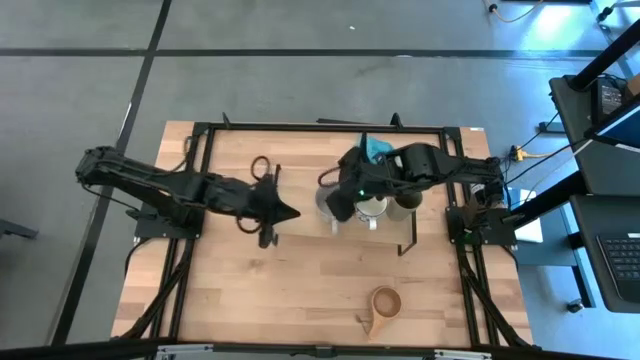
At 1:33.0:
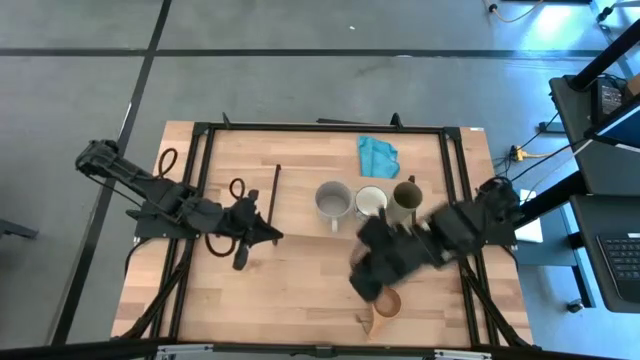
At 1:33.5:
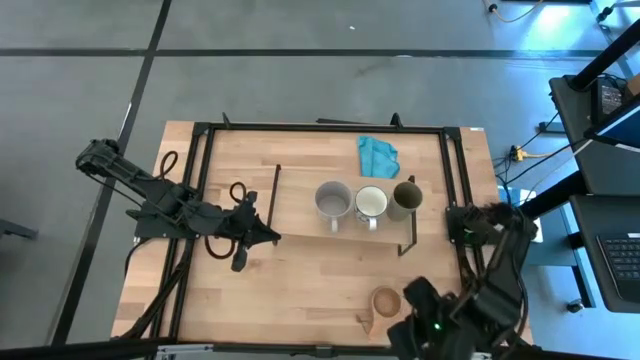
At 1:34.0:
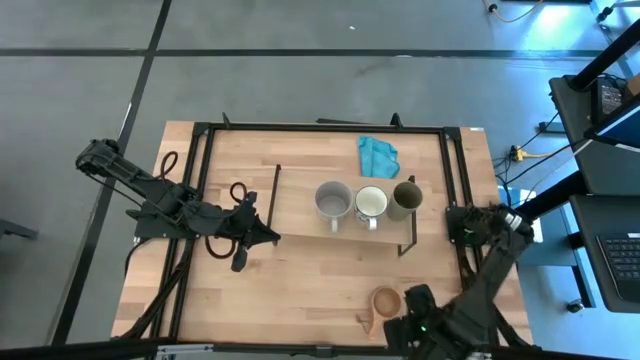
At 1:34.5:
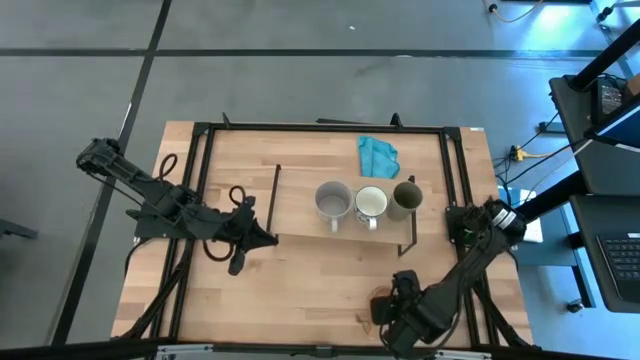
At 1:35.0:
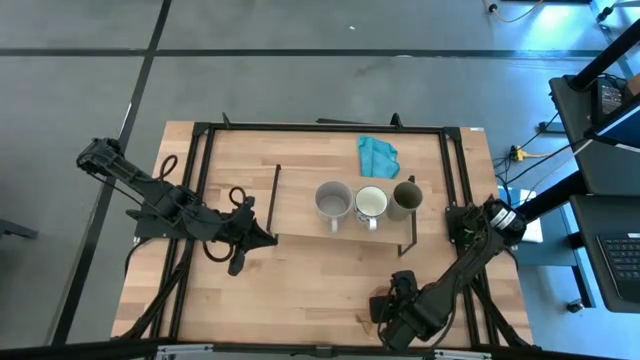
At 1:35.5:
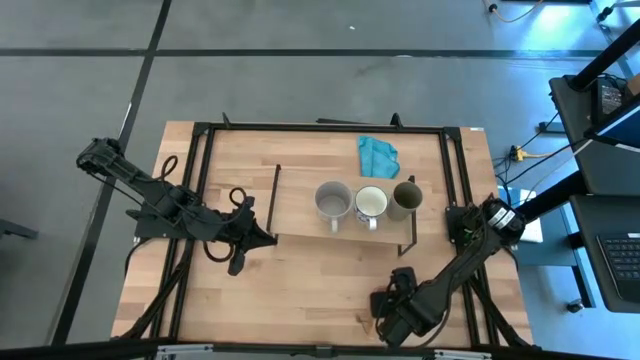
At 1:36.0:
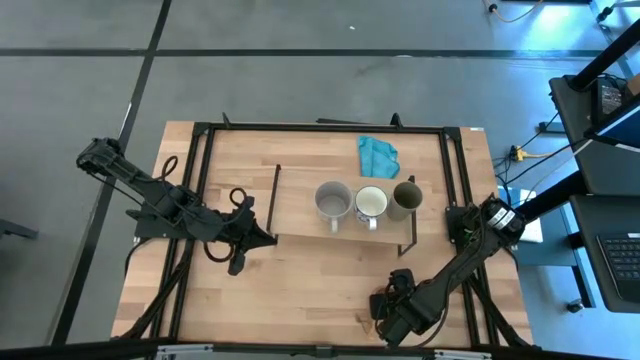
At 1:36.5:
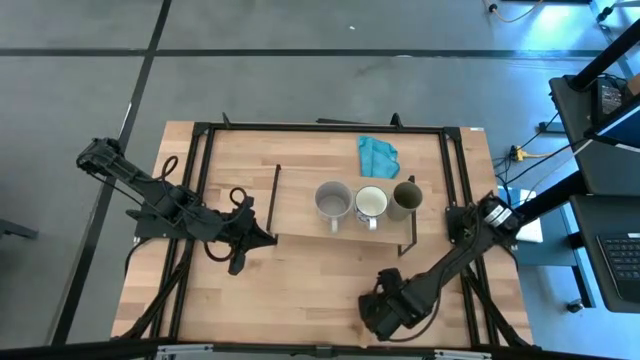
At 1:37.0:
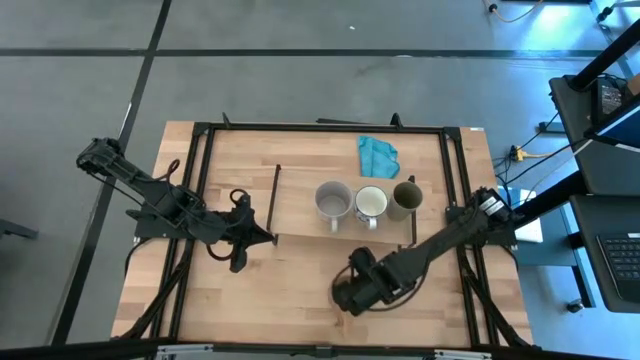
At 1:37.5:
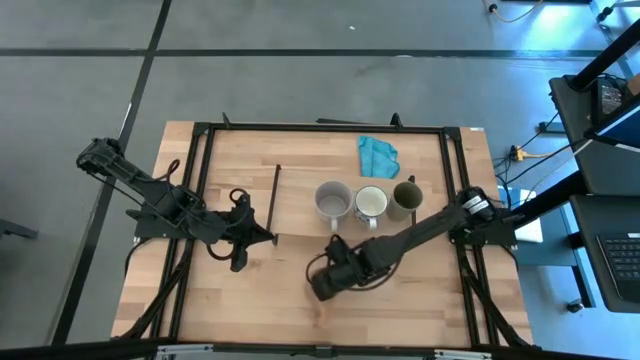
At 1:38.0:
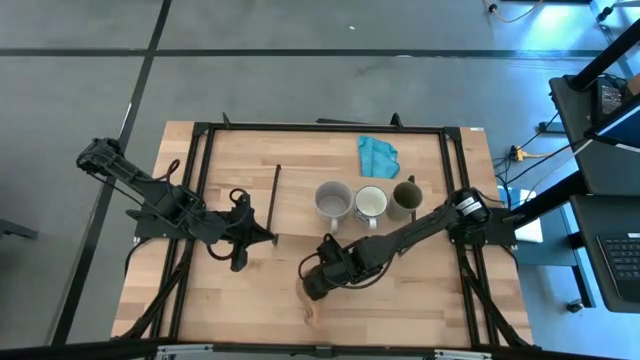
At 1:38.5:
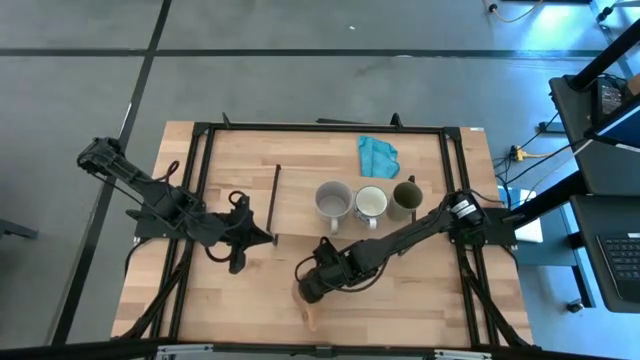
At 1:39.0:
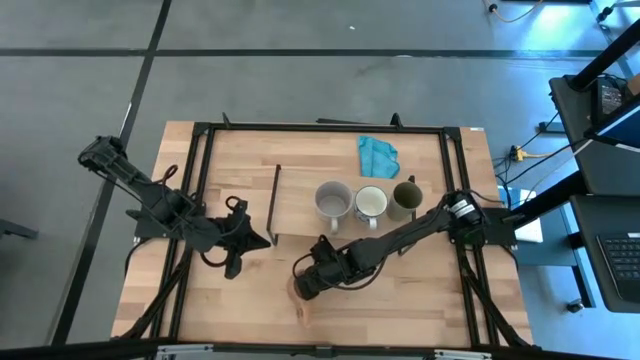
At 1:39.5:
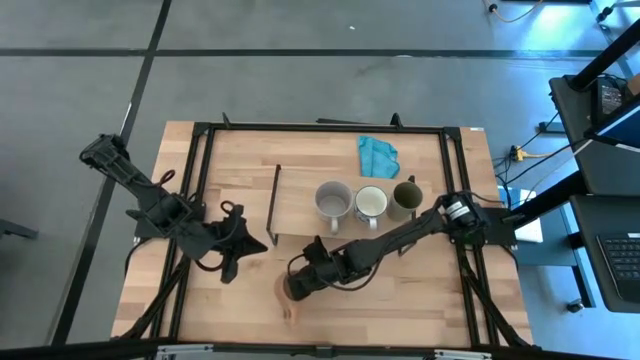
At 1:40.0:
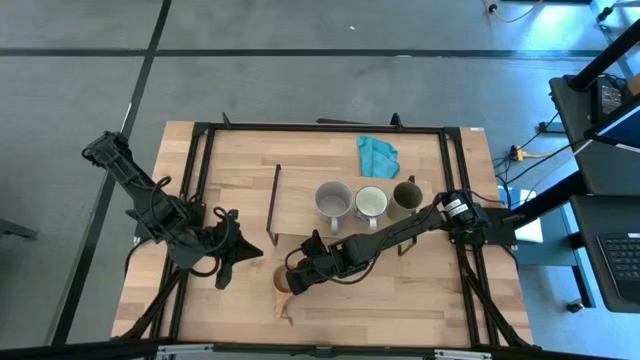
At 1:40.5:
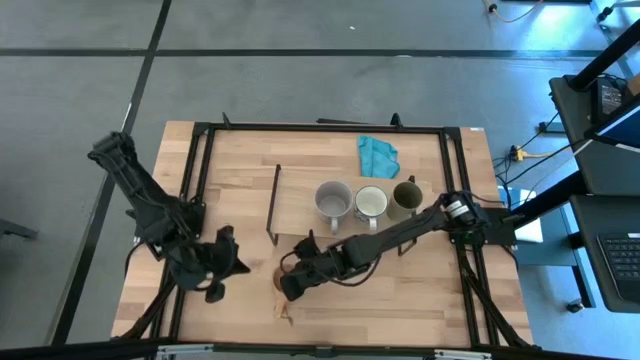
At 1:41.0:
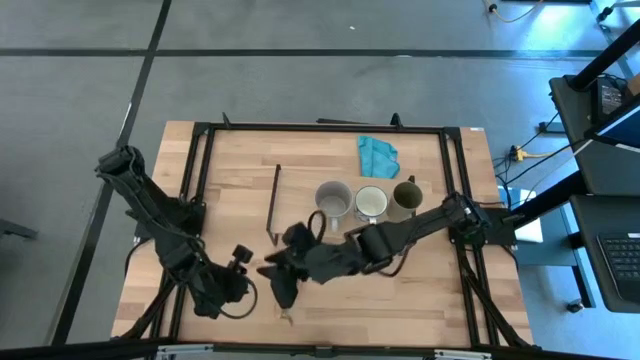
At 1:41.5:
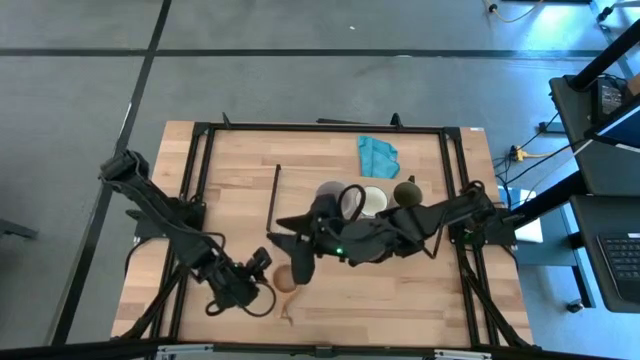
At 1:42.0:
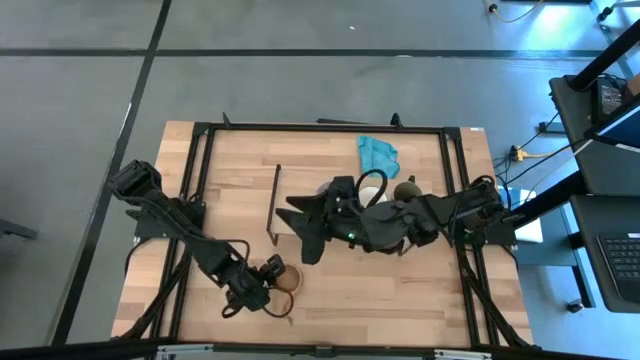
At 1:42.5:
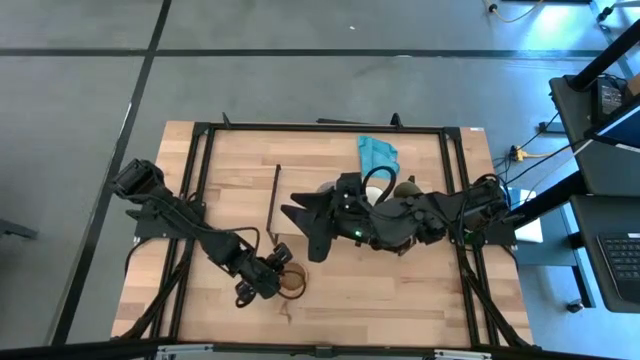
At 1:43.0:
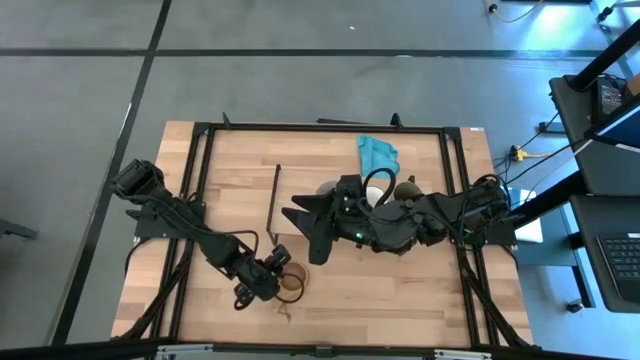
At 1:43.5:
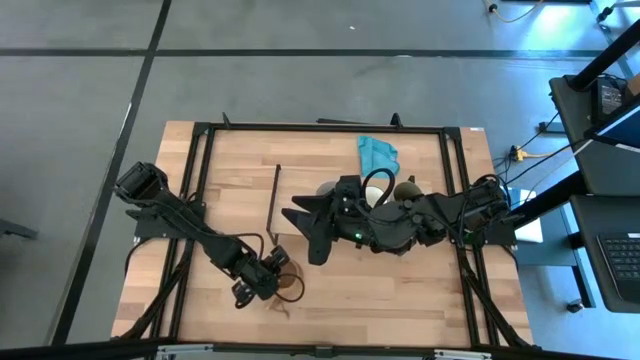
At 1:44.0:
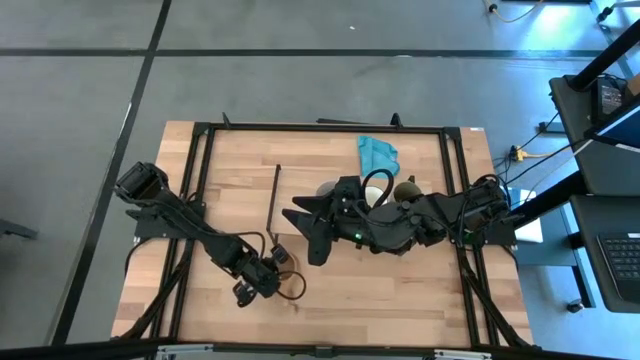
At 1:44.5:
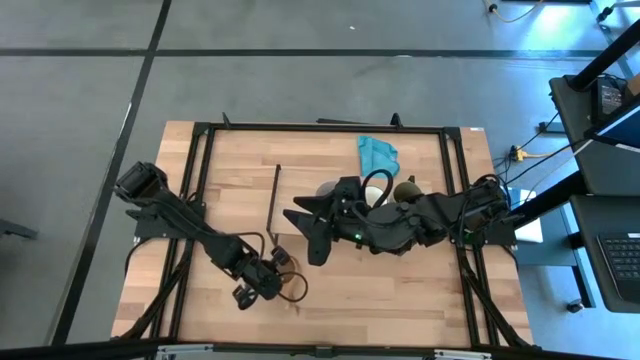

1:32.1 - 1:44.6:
Task: Stack small to large cups/mugs on shelf
Put the brown wooden mug on the shelf

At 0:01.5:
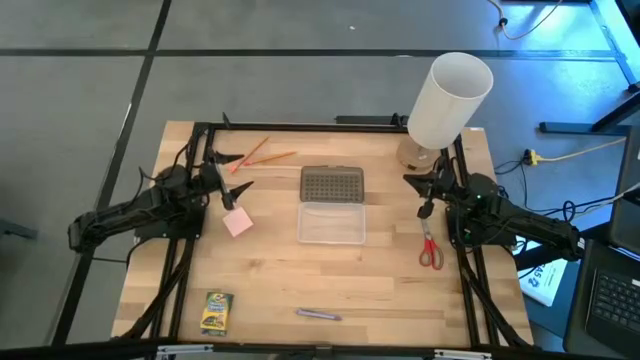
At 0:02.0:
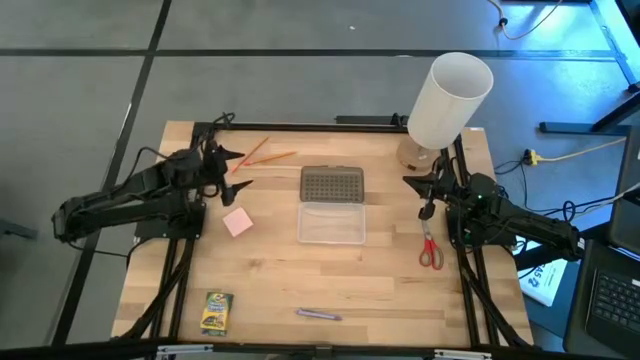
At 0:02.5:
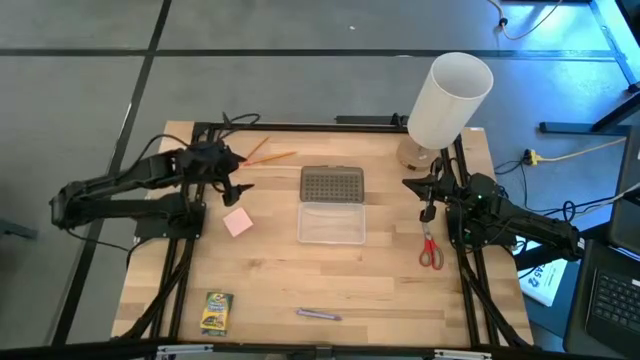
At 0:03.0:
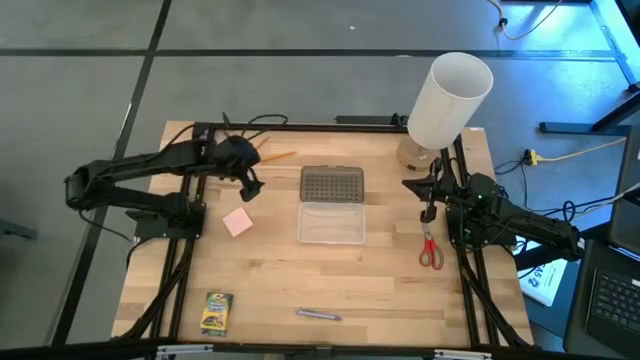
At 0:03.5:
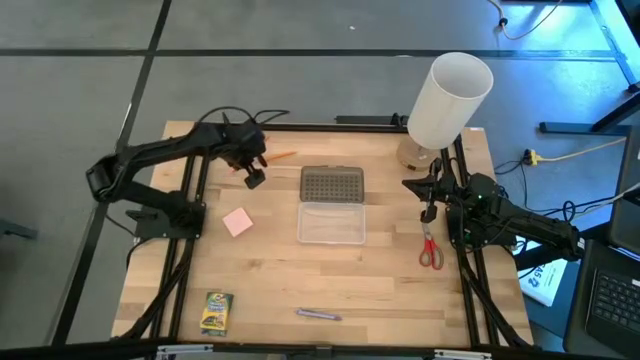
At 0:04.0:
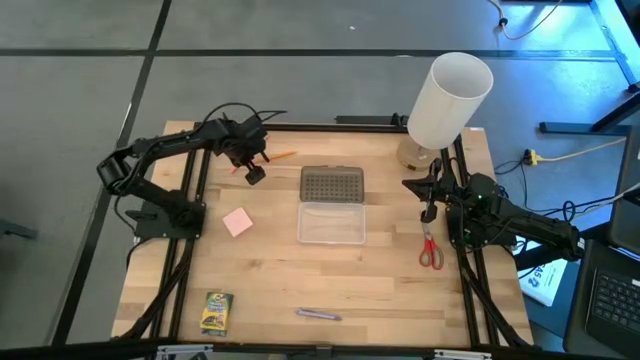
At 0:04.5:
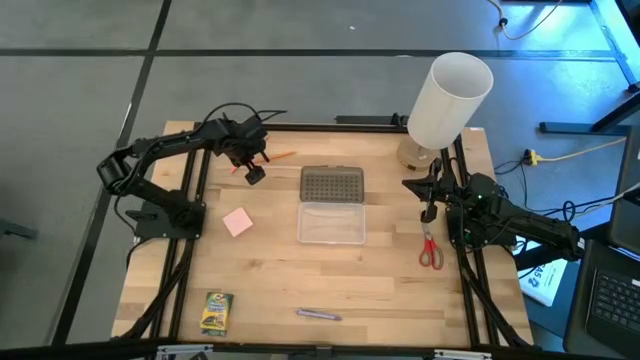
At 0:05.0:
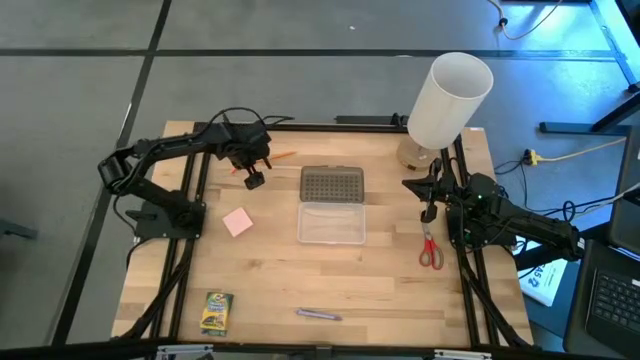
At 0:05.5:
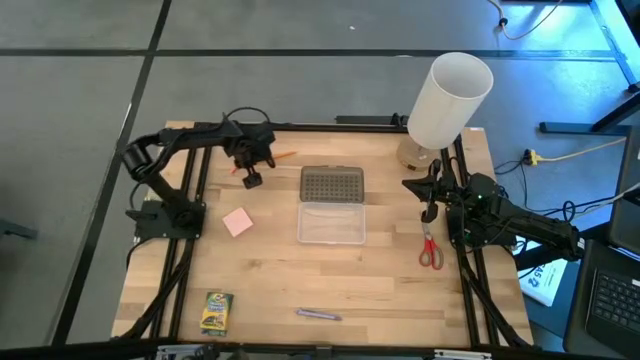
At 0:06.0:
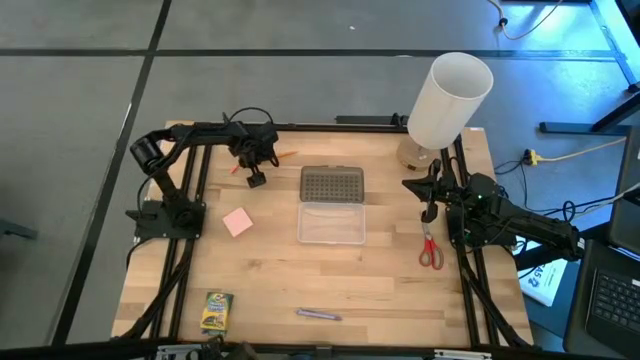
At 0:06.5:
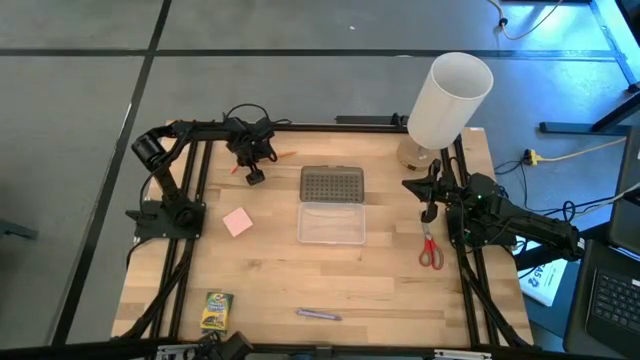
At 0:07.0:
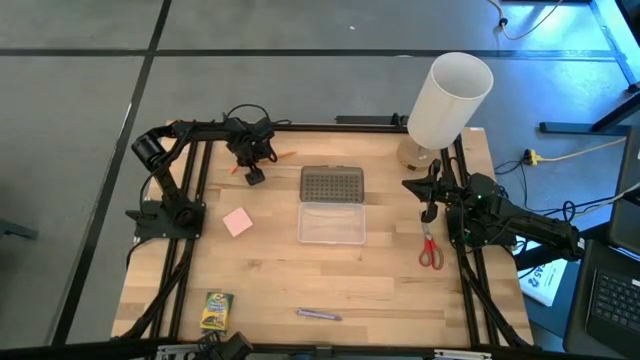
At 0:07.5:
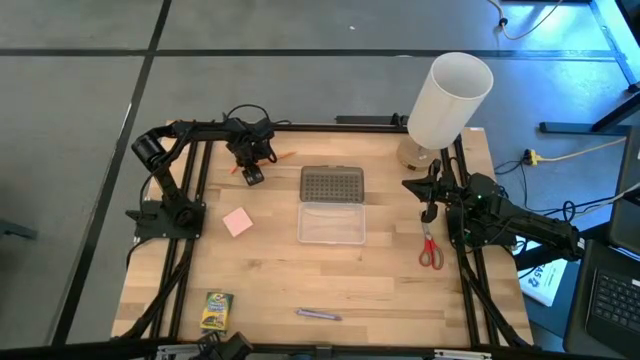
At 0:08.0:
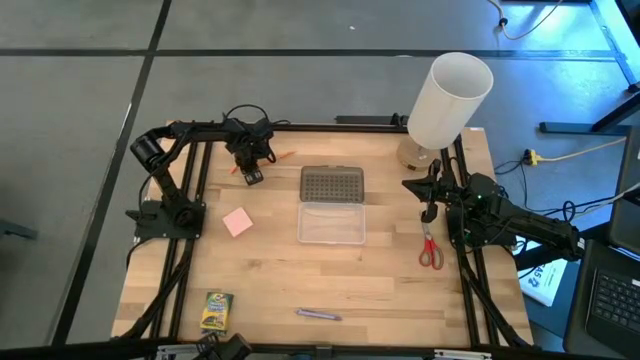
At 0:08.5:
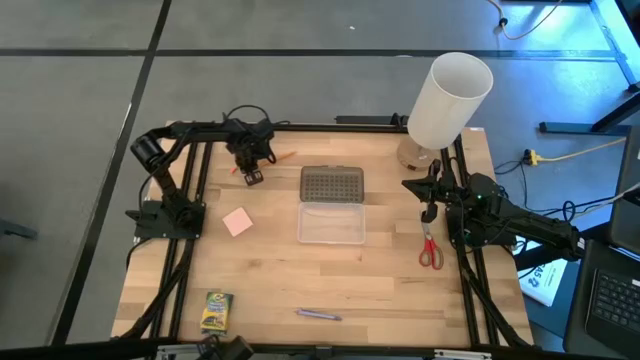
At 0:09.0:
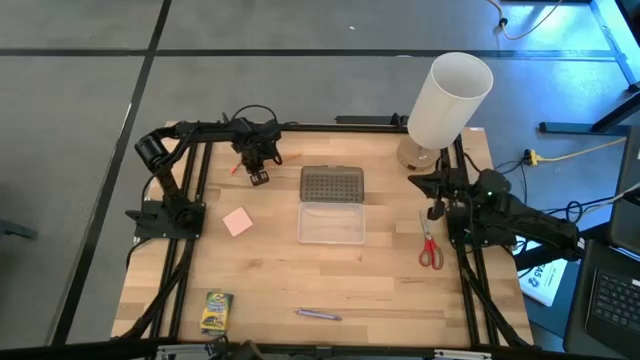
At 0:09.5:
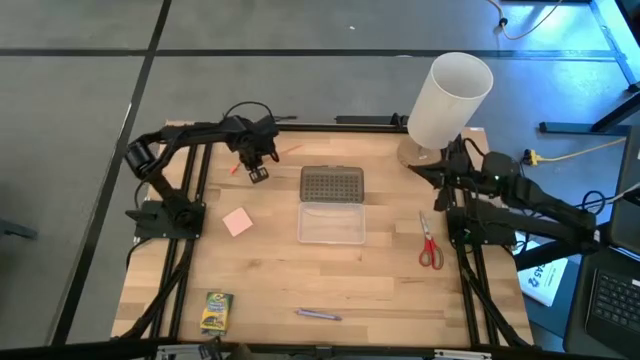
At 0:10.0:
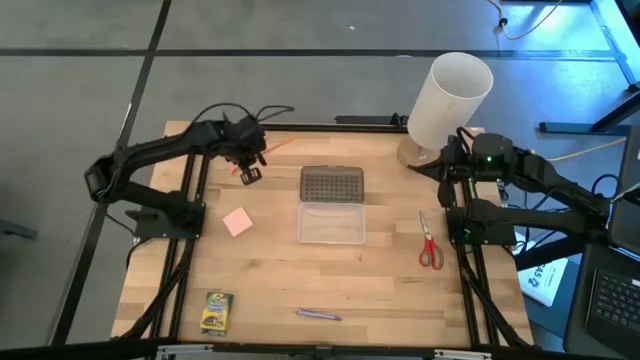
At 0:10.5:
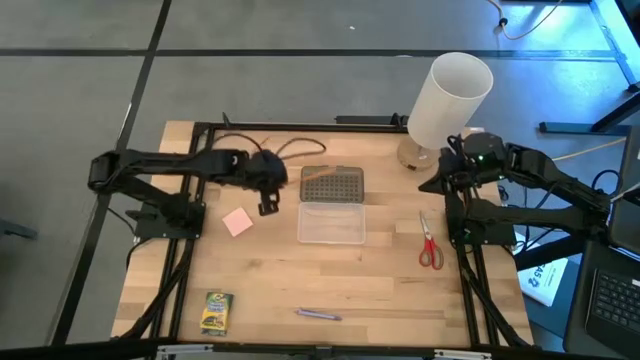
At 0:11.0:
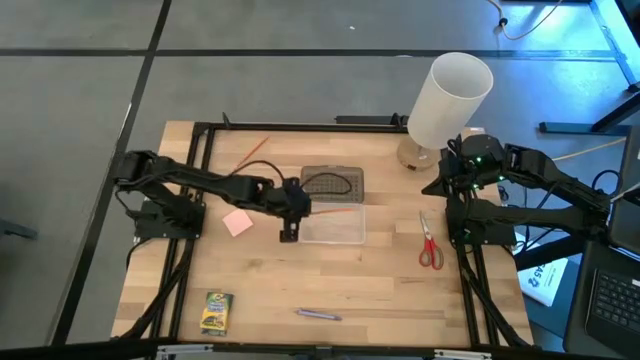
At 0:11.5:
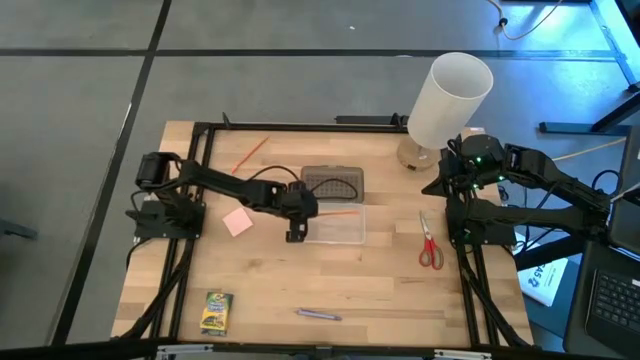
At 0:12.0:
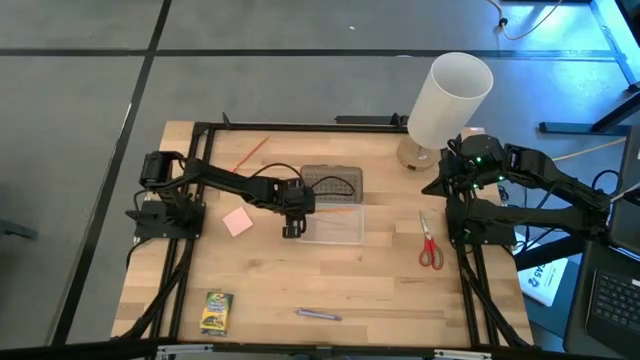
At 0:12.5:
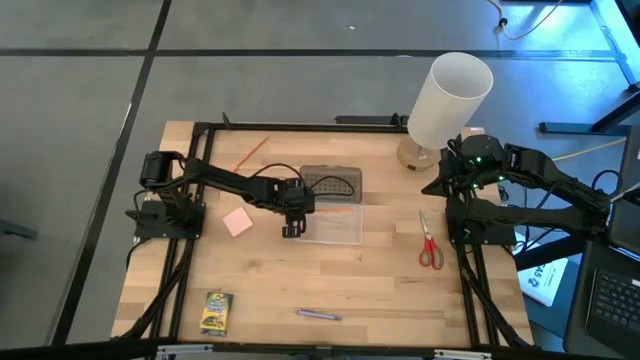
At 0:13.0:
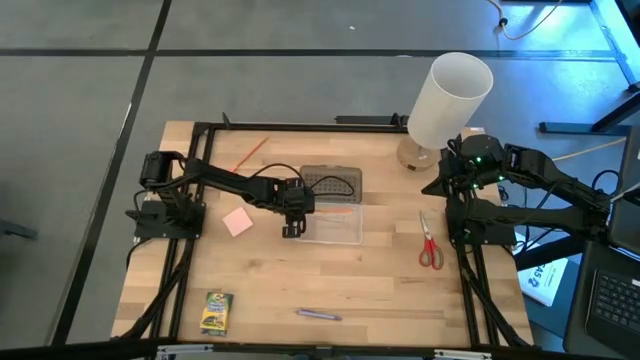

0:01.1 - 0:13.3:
Task: Pack school essentials
Put the right orange pencil into the supply box
